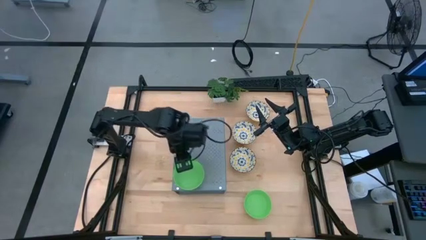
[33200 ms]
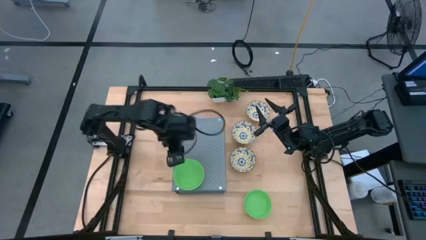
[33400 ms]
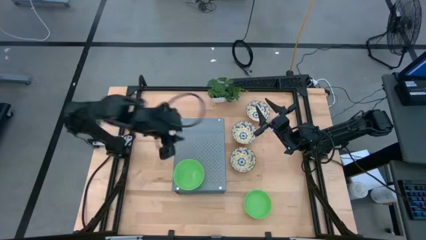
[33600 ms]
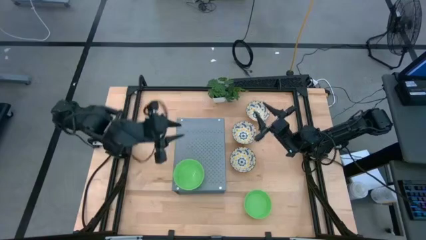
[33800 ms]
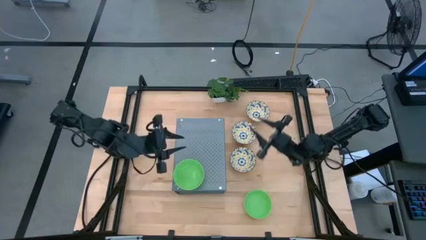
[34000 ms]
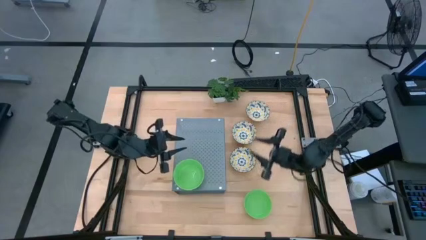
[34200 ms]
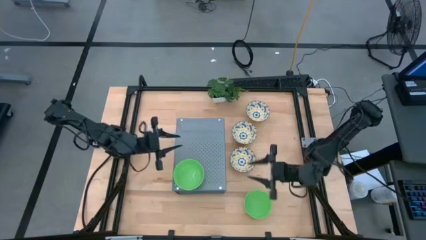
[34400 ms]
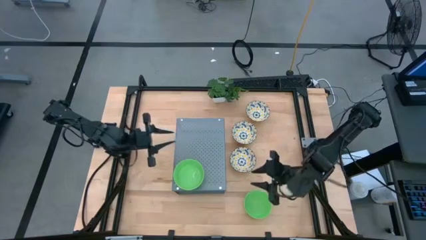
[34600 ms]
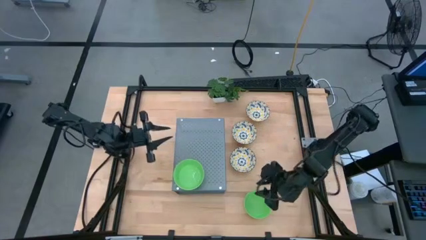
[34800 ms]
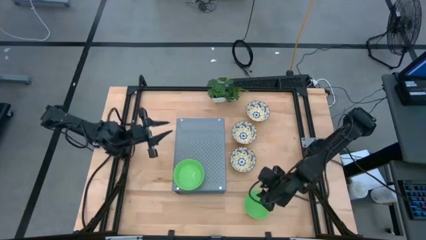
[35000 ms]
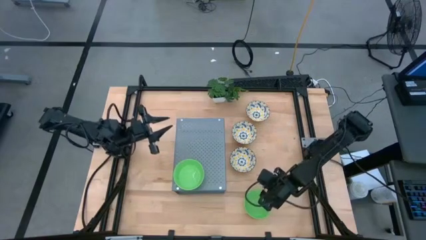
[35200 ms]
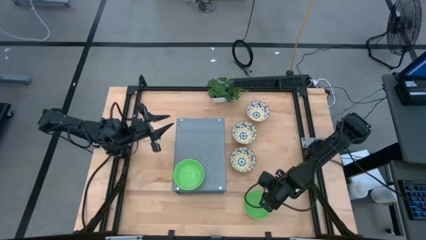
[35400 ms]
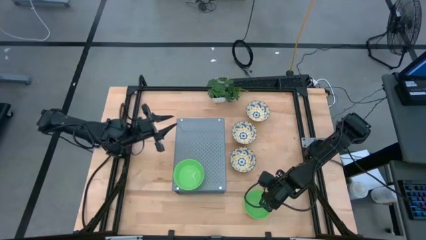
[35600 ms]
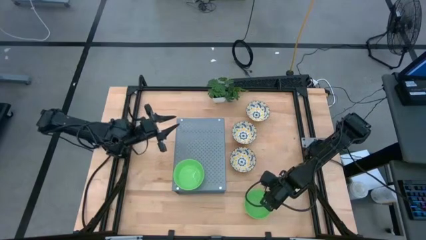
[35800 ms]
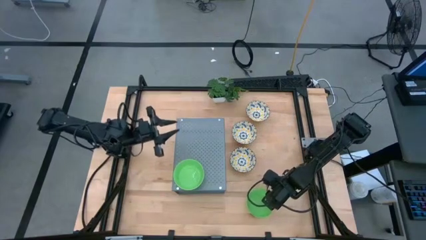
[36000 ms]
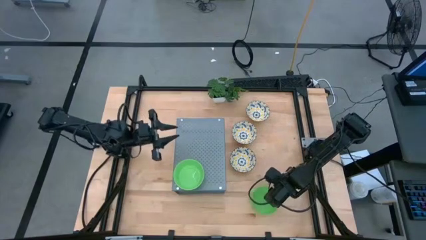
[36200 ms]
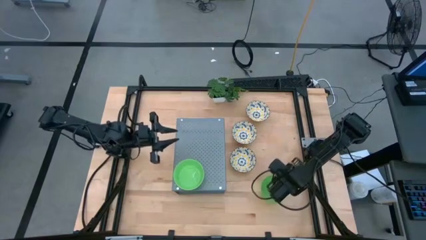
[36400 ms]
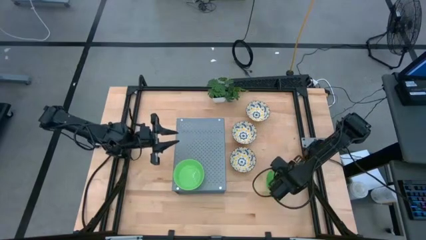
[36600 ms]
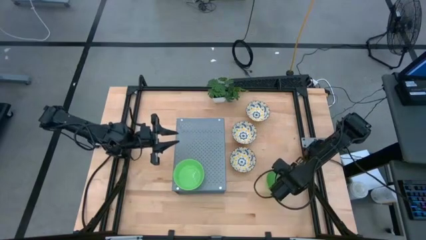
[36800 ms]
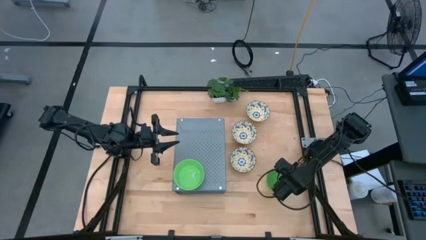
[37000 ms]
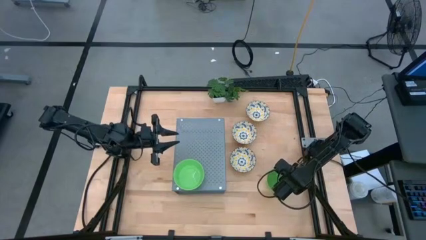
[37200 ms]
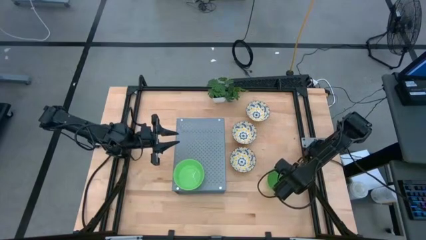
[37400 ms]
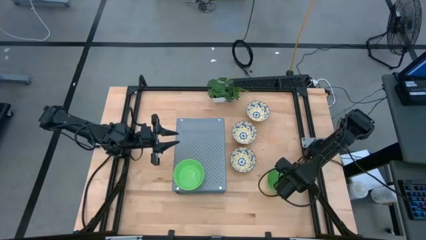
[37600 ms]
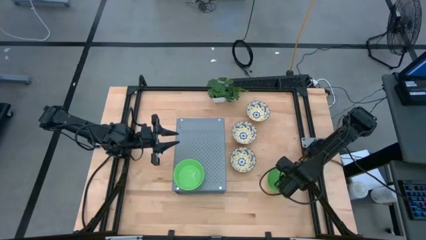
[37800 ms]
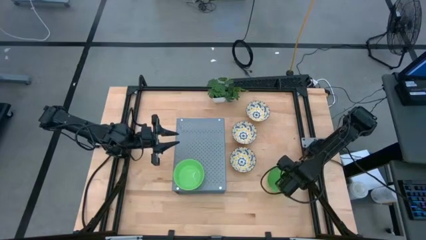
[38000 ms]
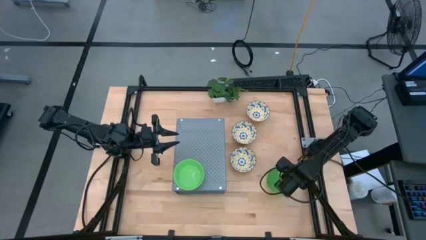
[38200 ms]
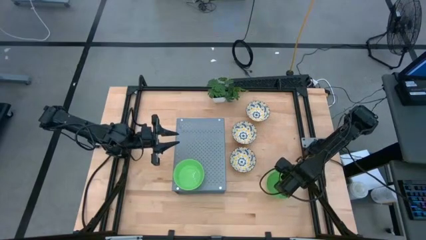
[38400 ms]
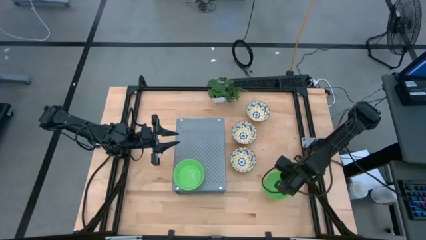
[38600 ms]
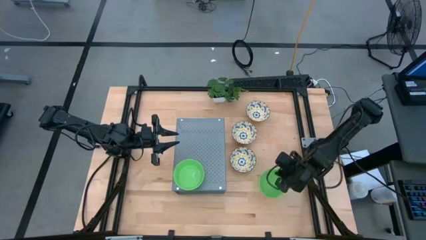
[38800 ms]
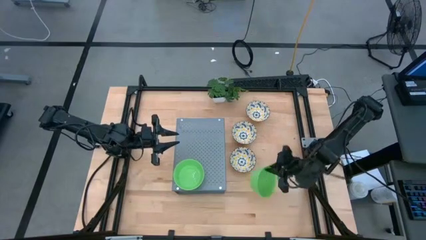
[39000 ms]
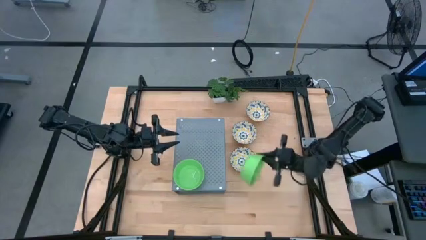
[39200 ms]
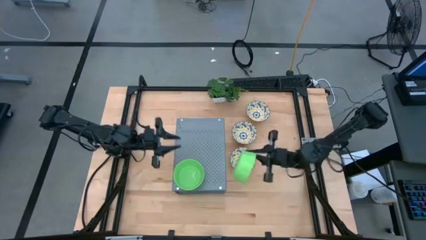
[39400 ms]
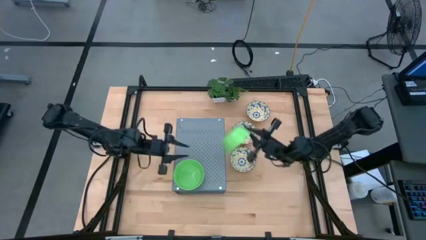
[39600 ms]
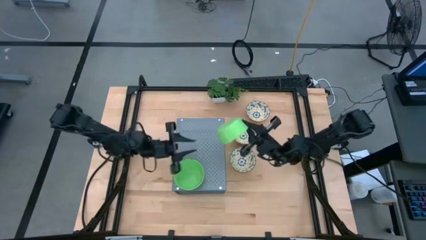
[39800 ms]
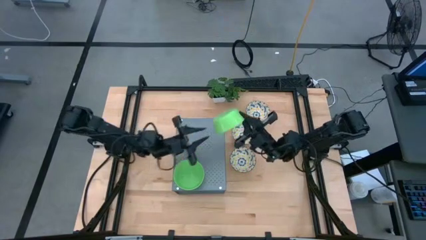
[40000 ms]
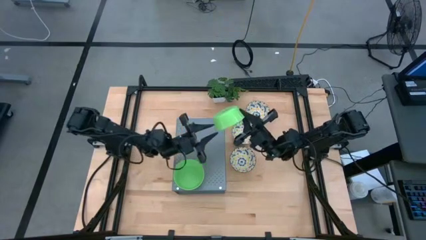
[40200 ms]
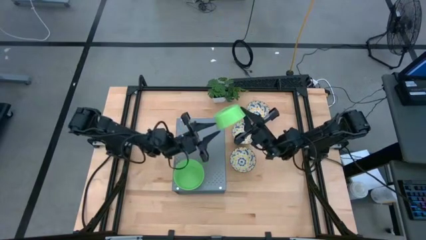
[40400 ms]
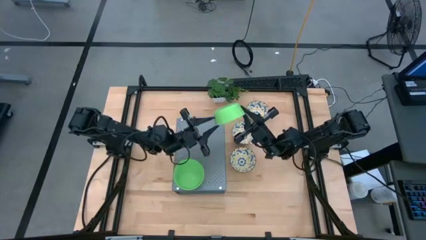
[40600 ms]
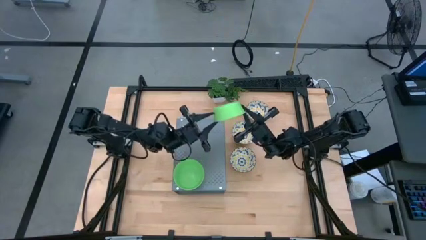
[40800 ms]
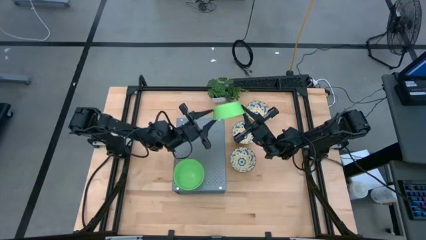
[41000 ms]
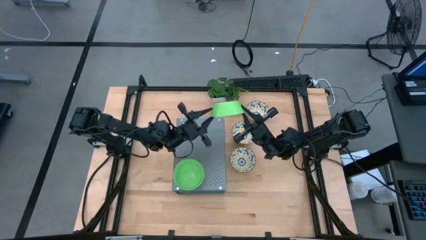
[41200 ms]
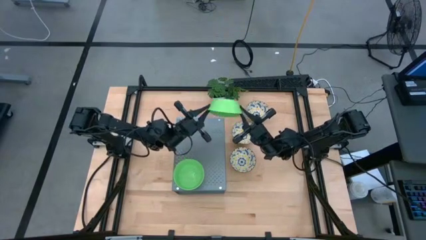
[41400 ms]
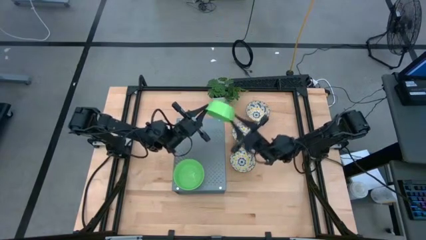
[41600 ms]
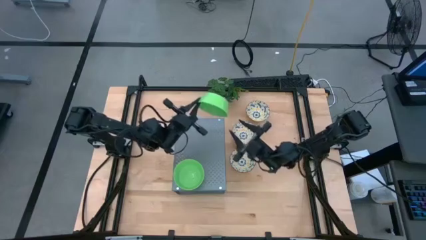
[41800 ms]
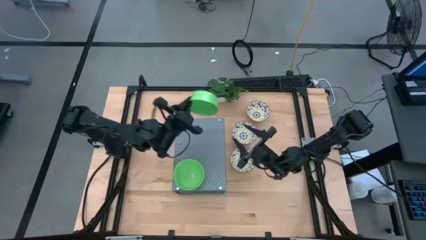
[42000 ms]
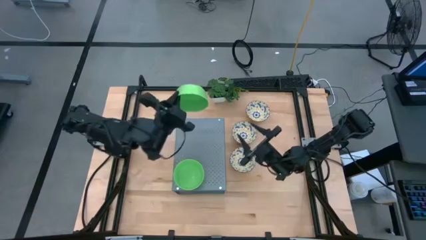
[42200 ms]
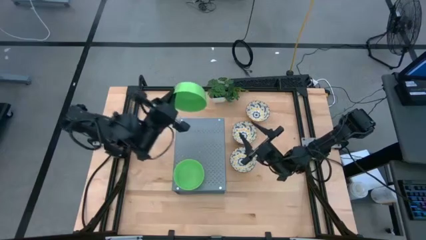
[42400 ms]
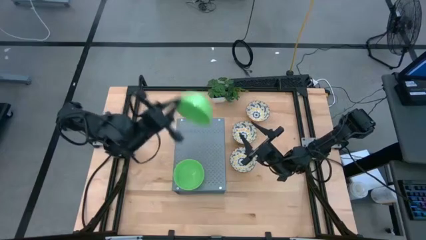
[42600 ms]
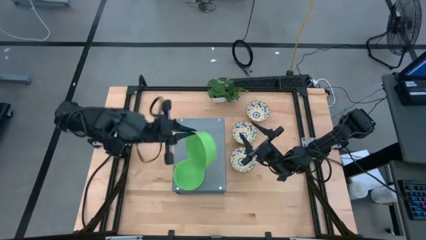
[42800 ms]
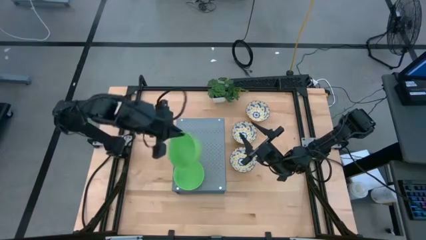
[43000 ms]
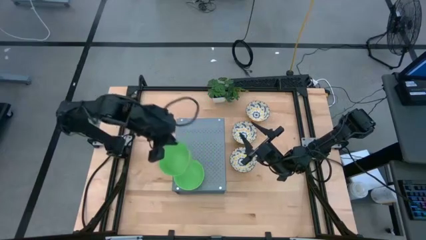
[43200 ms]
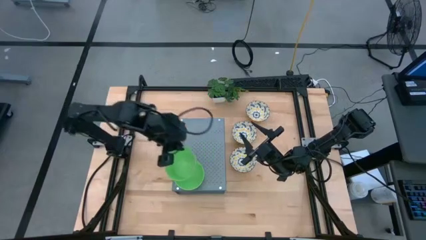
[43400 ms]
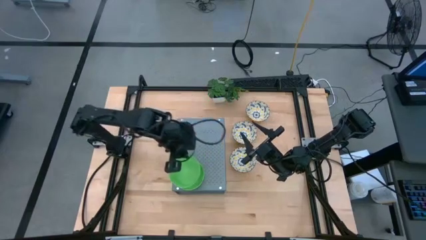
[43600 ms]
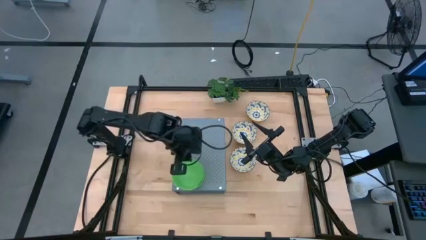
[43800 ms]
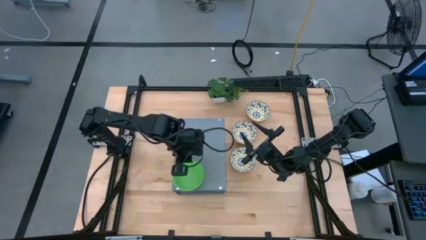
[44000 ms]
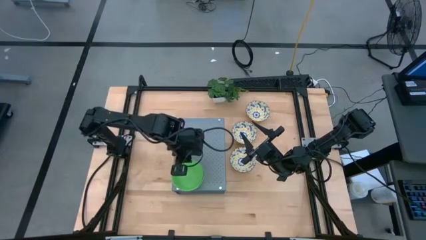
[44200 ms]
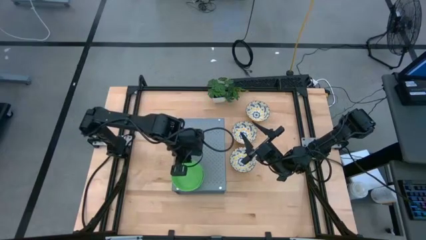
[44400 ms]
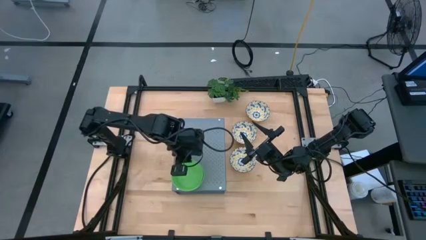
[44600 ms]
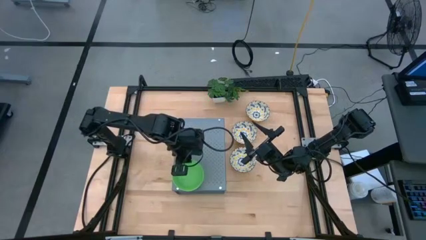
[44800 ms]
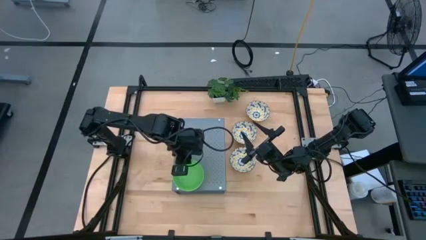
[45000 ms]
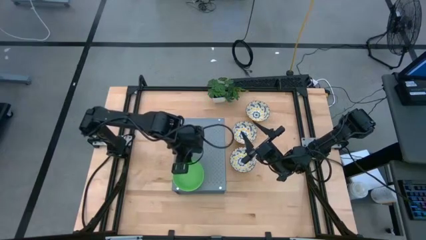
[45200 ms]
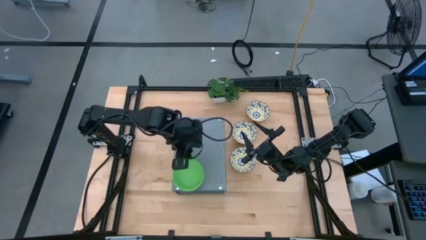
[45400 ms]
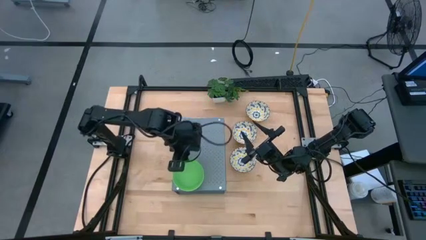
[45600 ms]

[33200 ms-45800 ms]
Task: Pick & Place Mini bowls
Stack the green bowl on the green bowls on the shelf

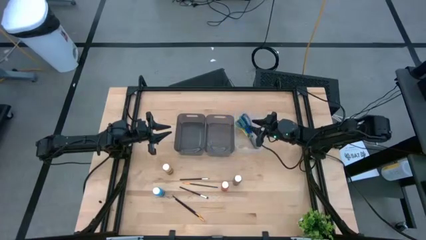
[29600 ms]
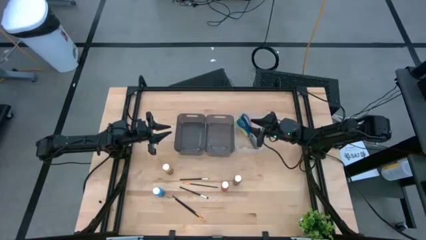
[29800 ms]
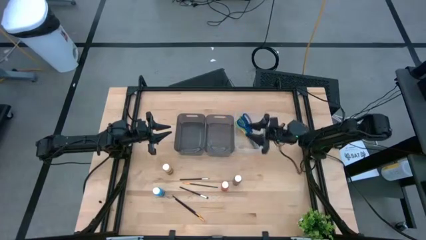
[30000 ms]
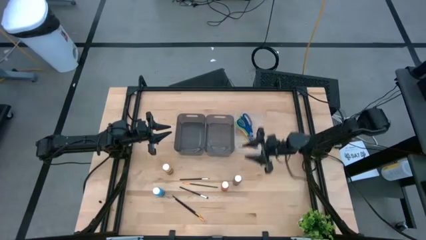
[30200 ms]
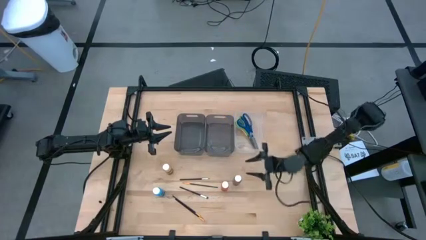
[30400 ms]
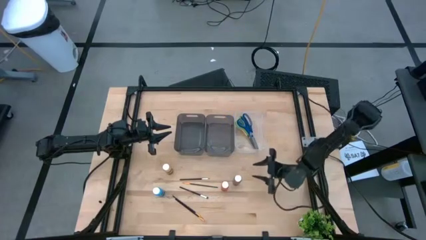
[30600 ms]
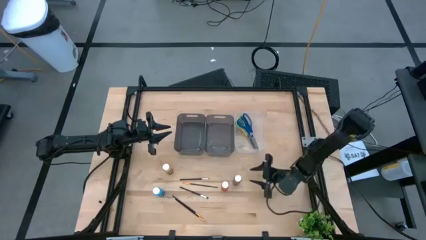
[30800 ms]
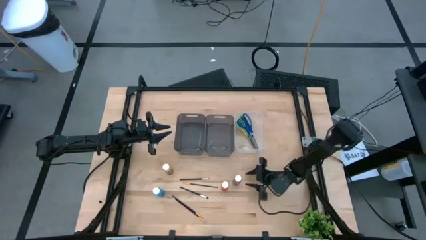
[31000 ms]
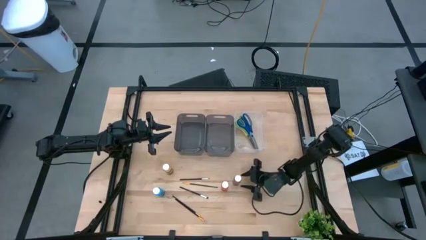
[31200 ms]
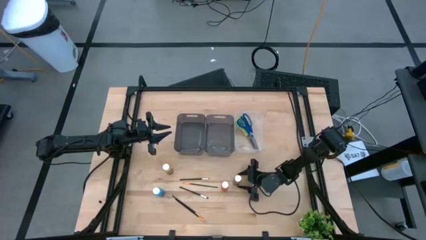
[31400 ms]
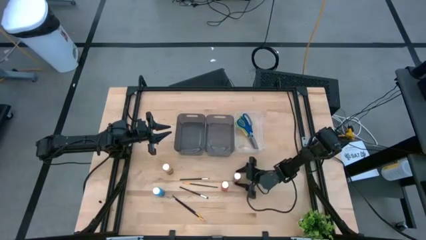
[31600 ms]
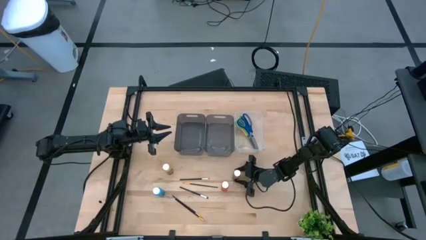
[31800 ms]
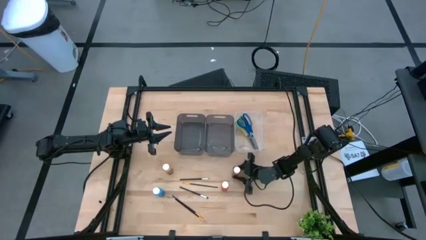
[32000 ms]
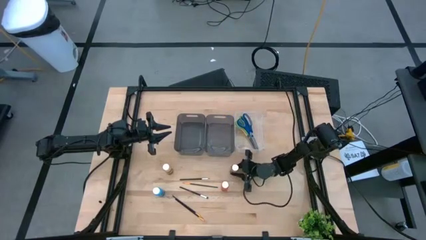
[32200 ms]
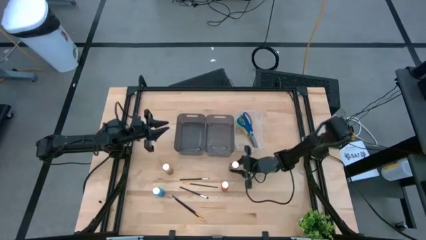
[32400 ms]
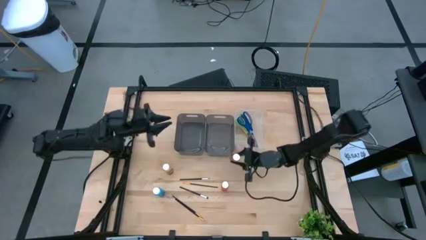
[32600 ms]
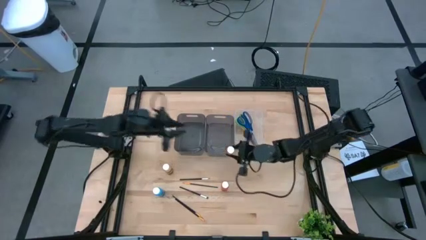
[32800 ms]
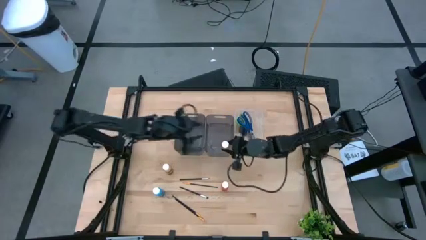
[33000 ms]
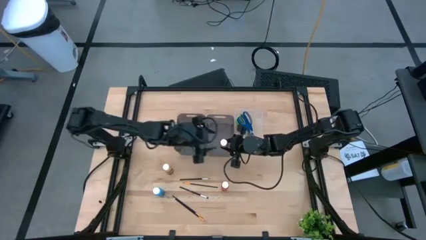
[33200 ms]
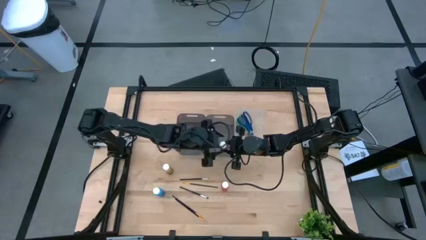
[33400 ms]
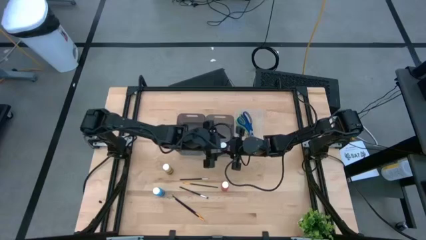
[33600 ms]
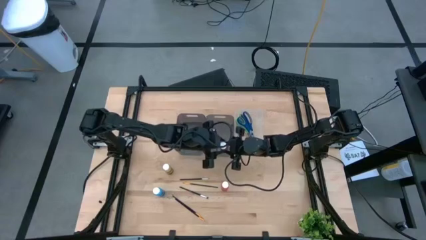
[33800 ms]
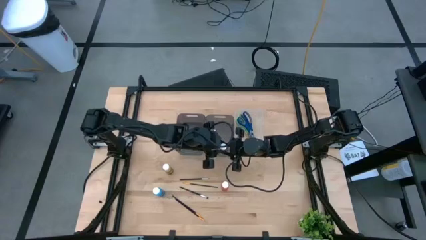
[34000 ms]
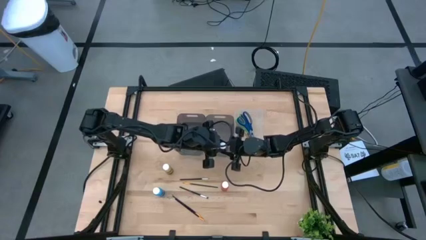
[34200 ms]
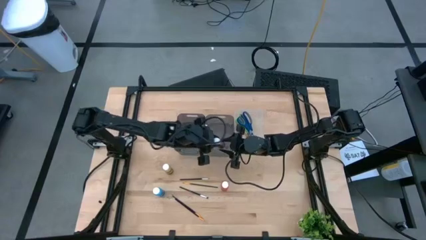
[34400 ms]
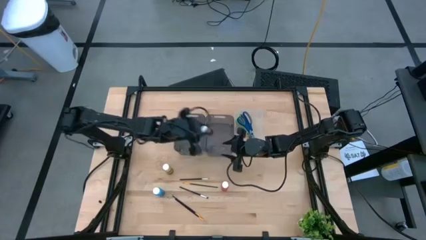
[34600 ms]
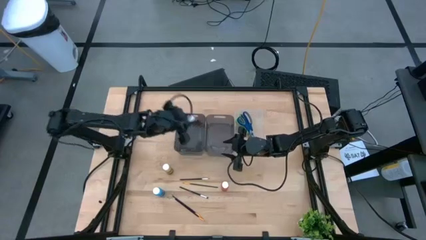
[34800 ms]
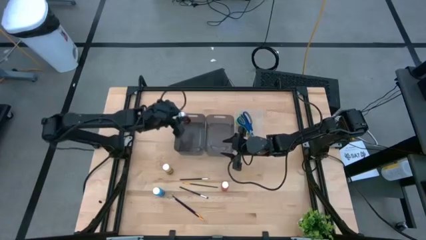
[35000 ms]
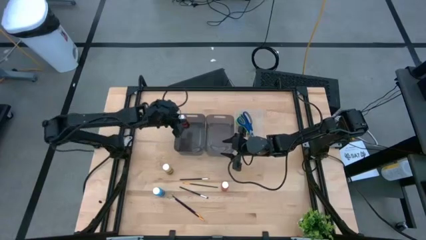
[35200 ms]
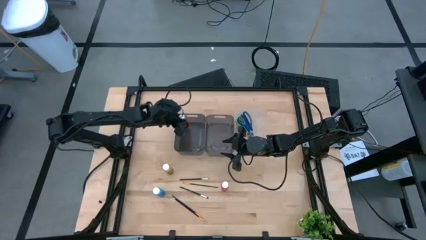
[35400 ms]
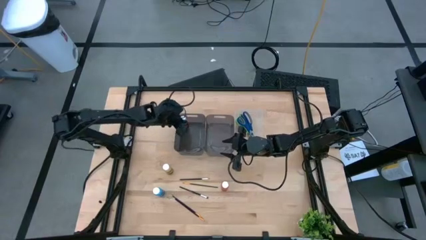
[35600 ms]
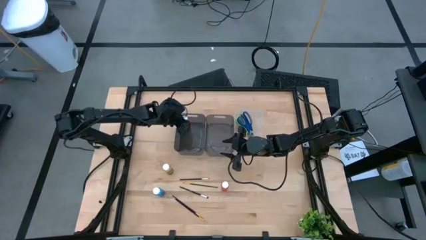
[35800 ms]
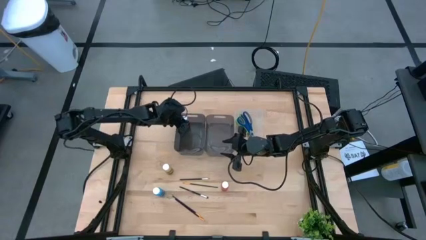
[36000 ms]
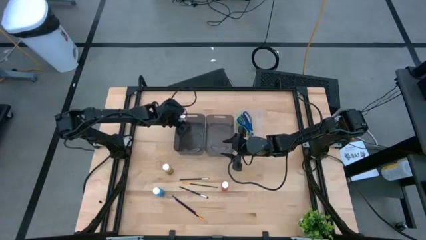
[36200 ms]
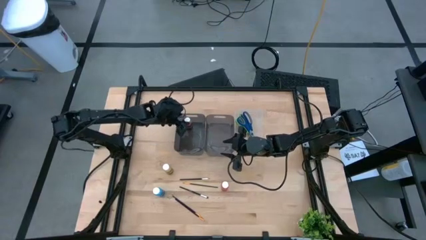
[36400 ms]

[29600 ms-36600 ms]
Task: Pick & Place Paint Supplies
Put the brown paint bottle into the left black bin
